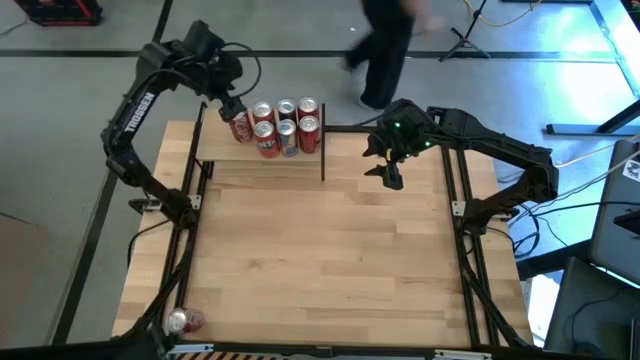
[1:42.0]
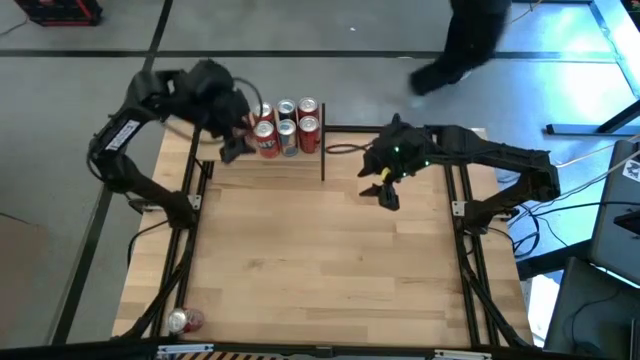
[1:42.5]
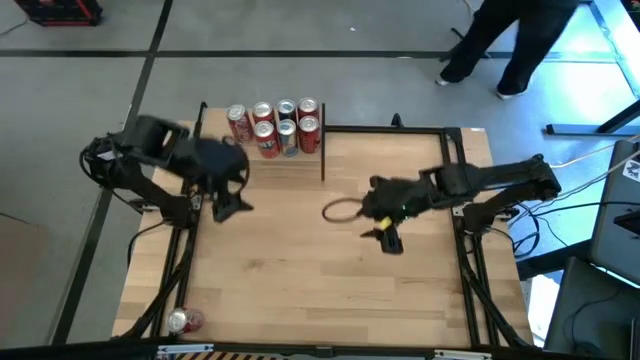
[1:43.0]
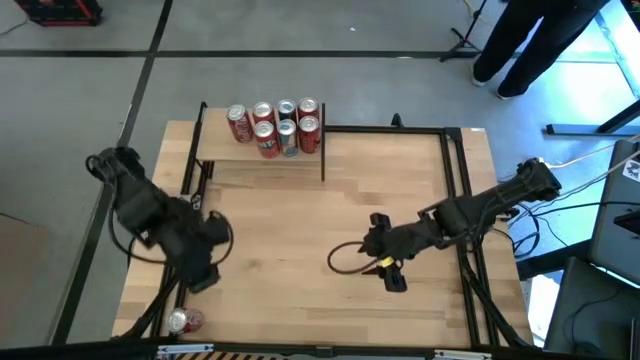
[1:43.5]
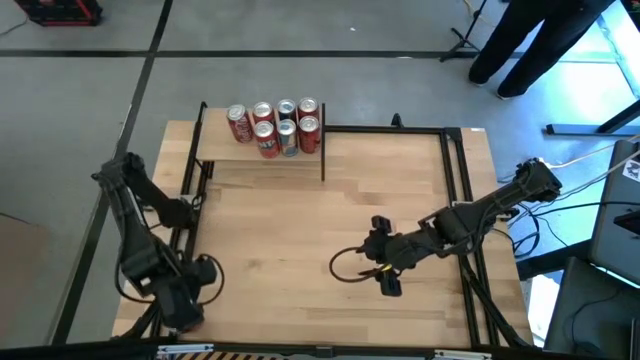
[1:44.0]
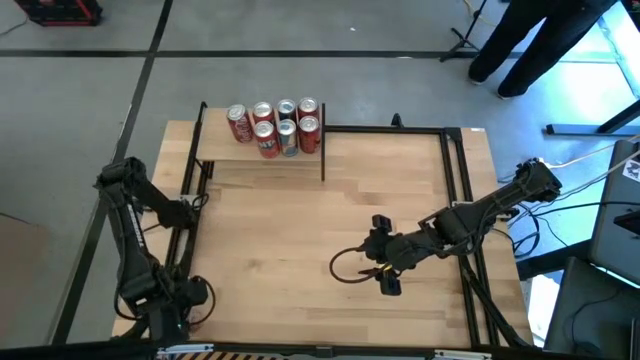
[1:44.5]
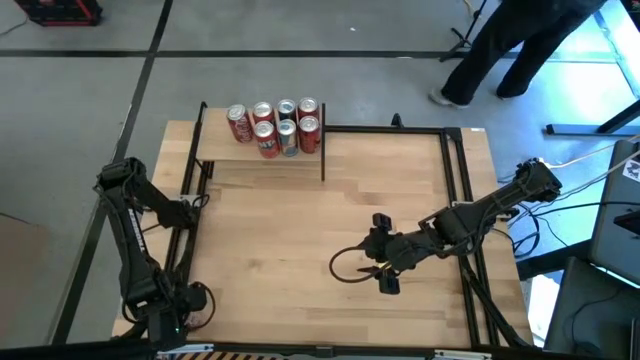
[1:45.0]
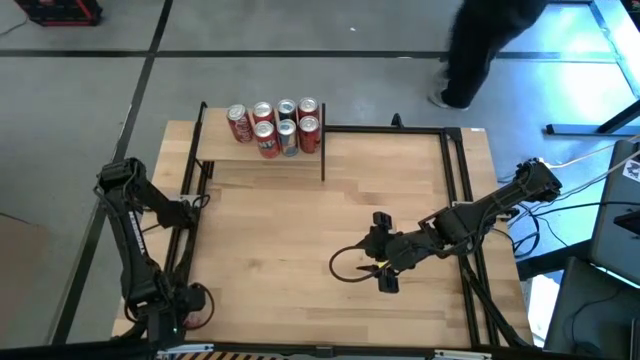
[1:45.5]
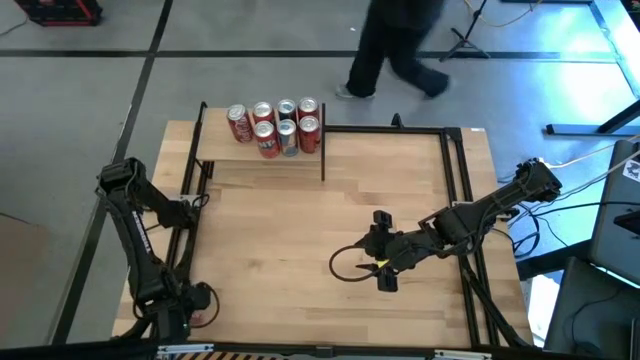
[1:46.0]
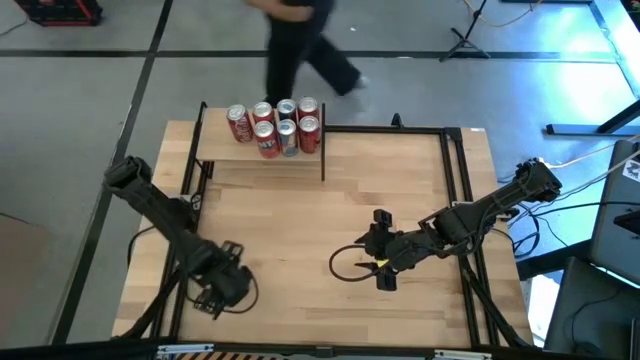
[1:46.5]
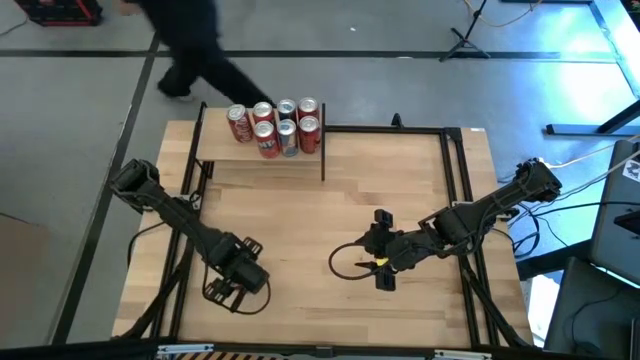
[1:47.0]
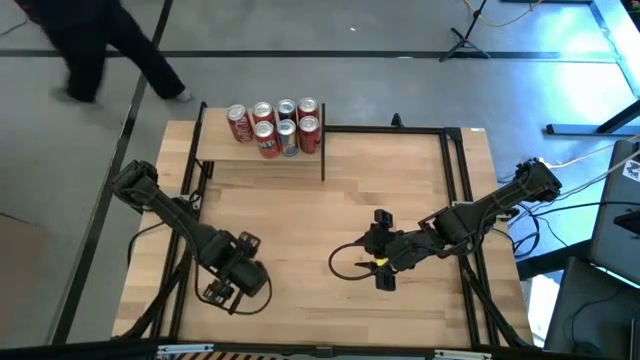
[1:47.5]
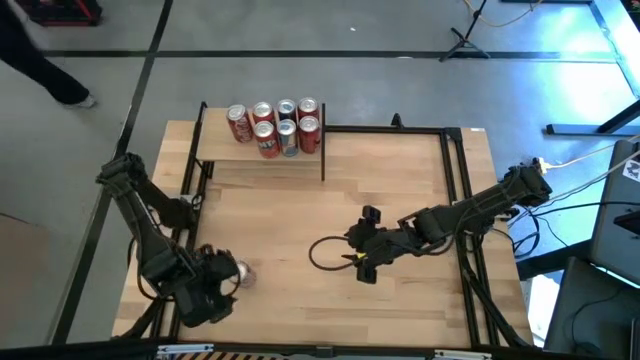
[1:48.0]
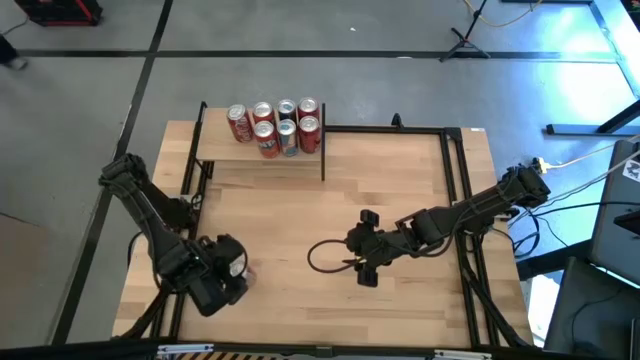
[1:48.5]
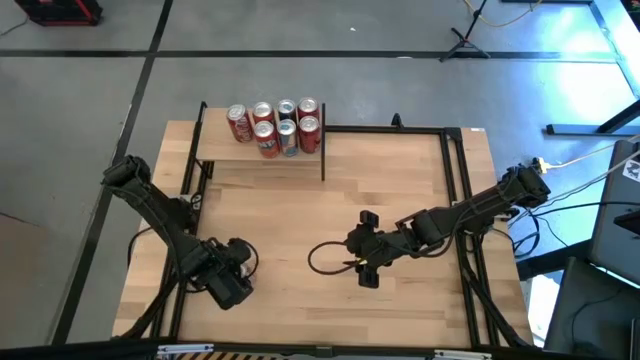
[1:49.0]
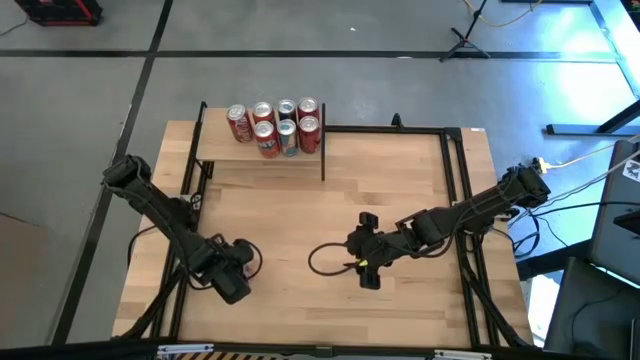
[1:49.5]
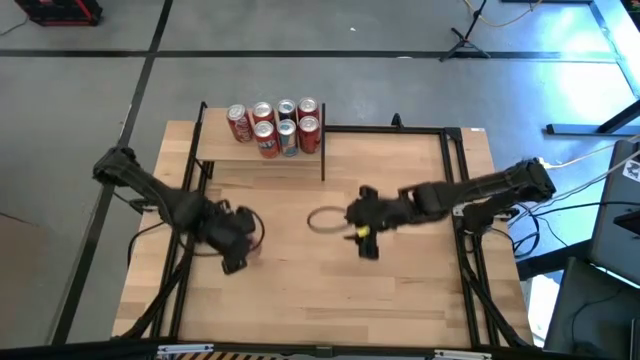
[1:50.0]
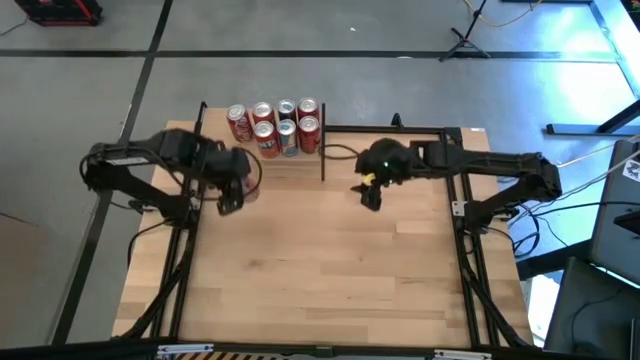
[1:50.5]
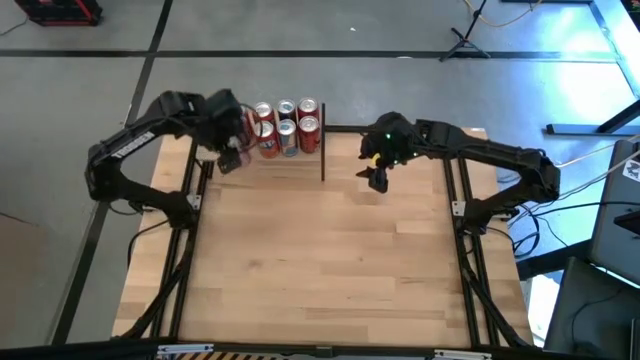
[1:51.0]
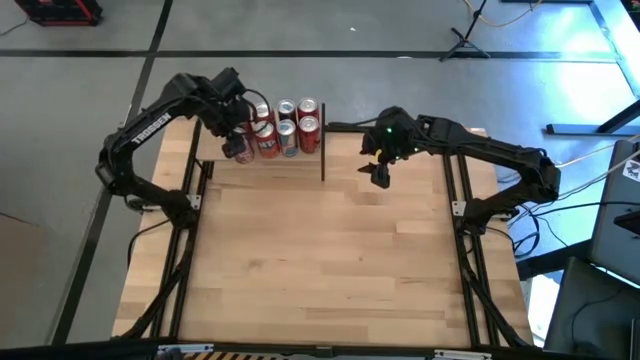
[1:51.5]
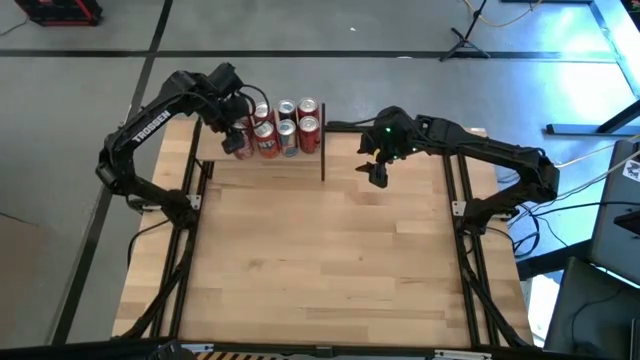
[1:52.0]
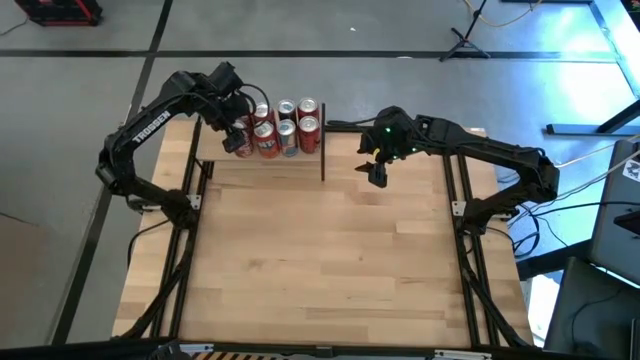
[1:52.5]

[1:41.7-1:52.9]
Task: Place canned beverage on shelf
Put the red-white soda can on the shelf aligned with the other red-white soda can

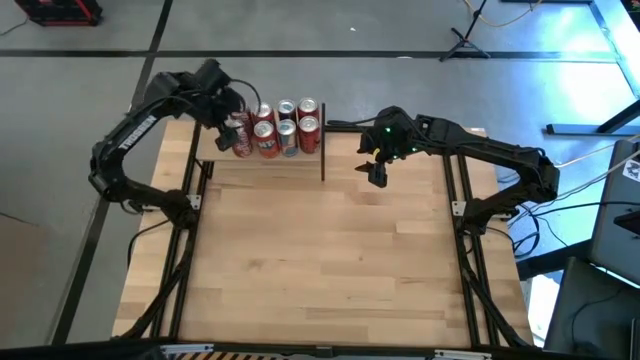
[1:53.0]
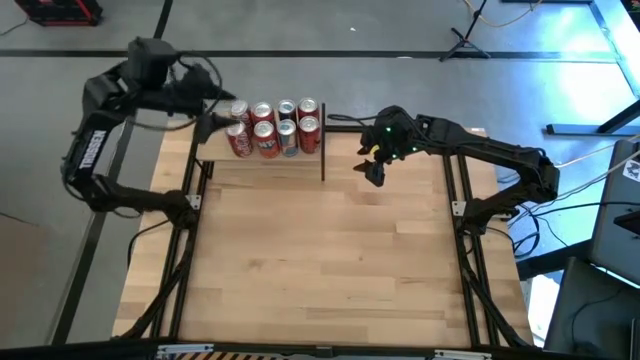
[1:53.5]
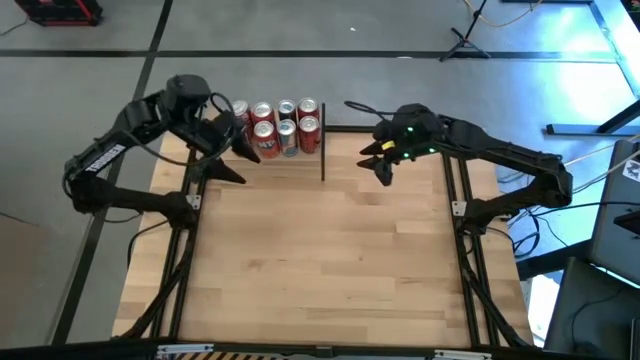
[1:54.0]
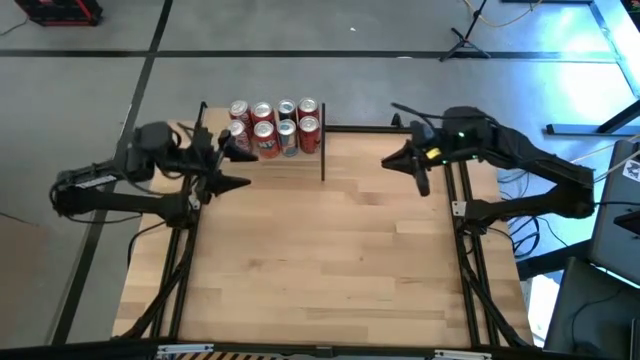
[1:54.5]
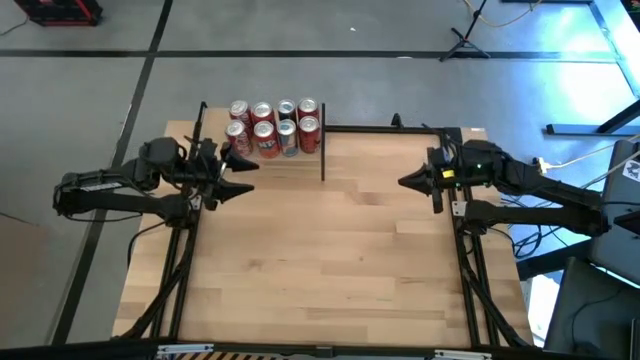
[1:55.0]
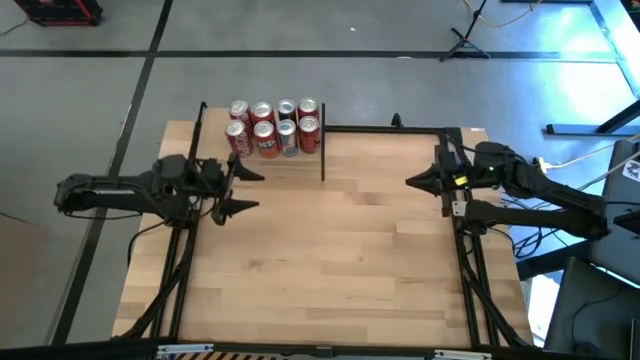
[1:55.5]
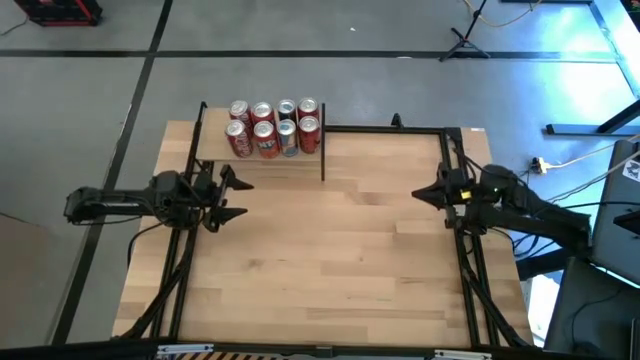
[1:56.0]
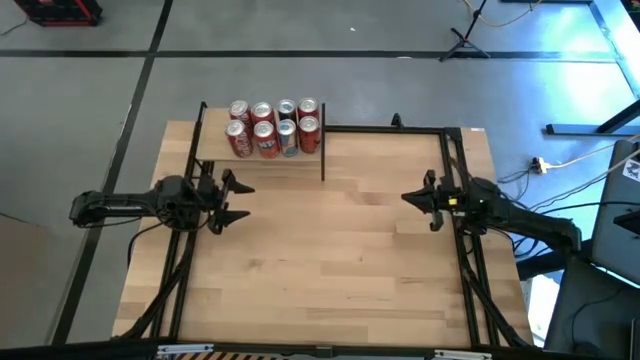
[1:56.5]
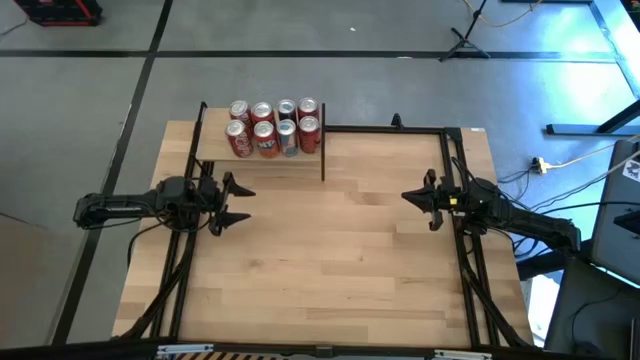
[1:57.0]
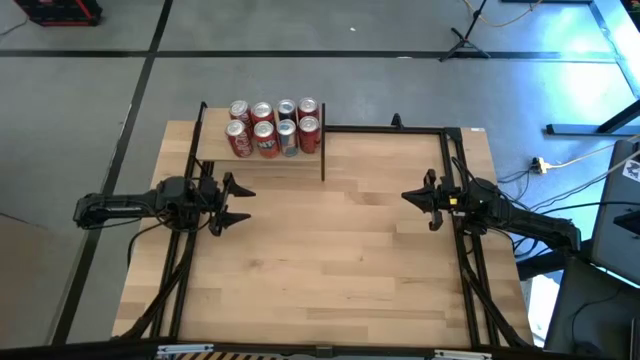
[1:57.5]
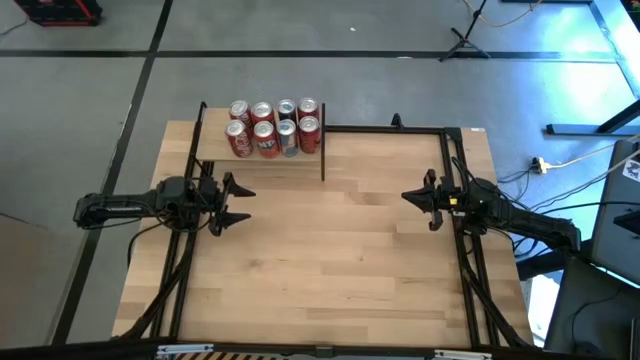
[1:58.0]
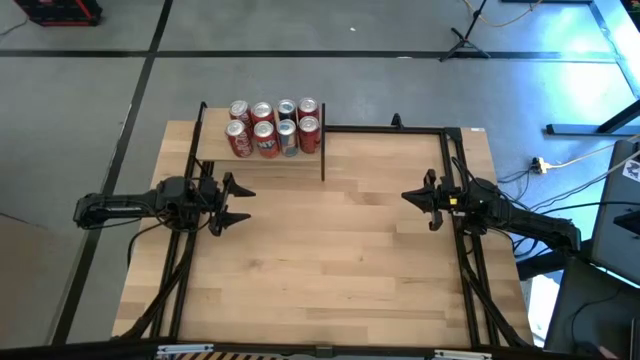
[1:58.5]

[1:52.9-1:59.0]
Return to Home Position

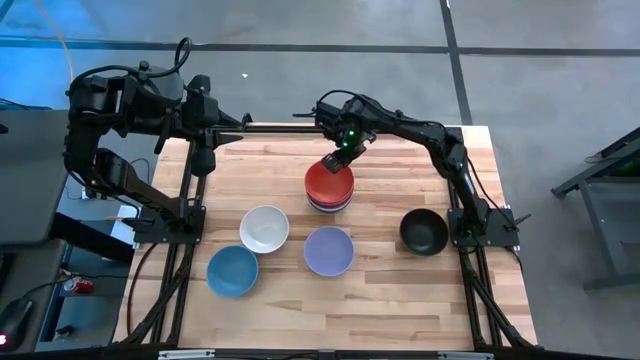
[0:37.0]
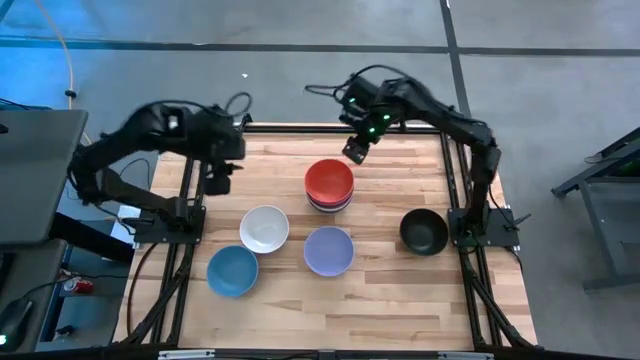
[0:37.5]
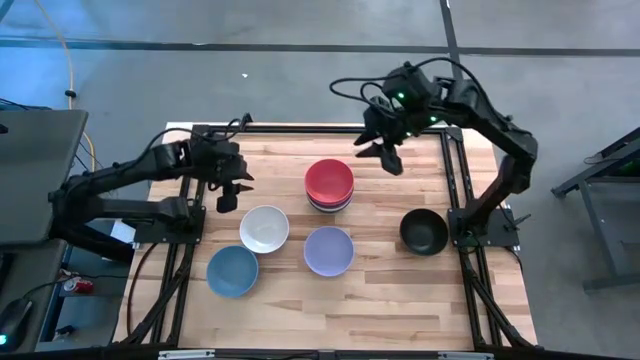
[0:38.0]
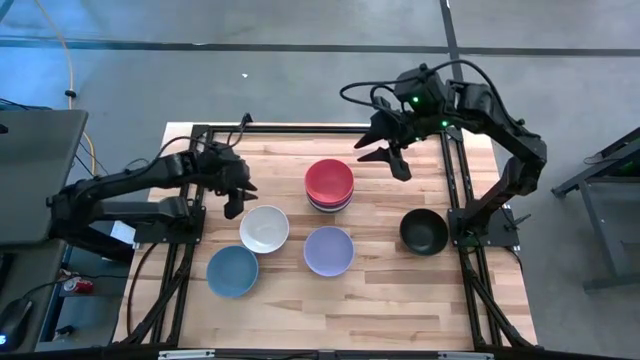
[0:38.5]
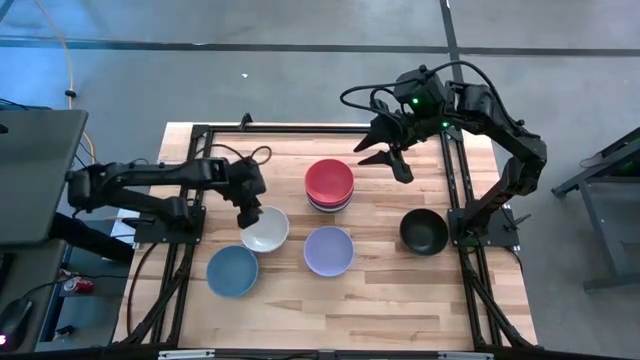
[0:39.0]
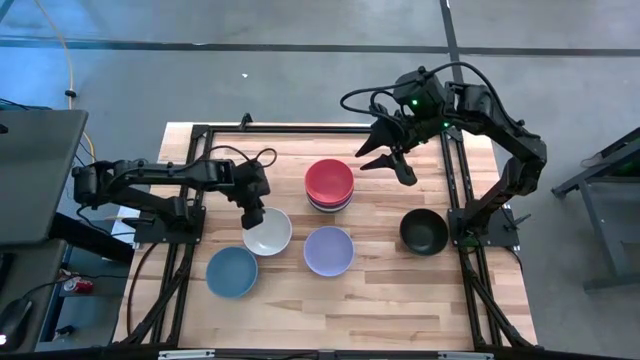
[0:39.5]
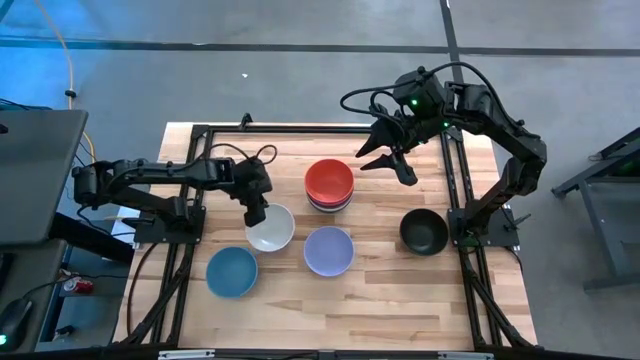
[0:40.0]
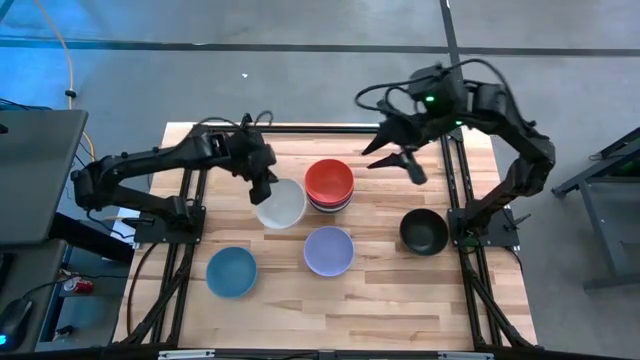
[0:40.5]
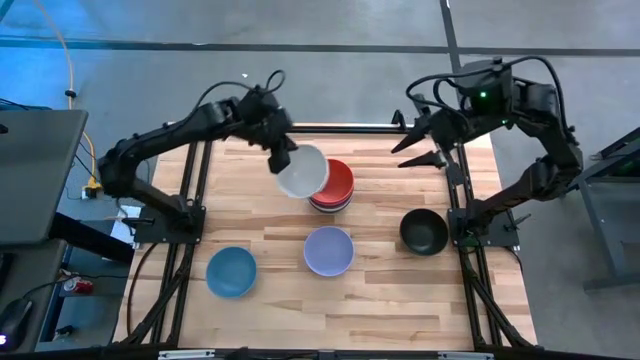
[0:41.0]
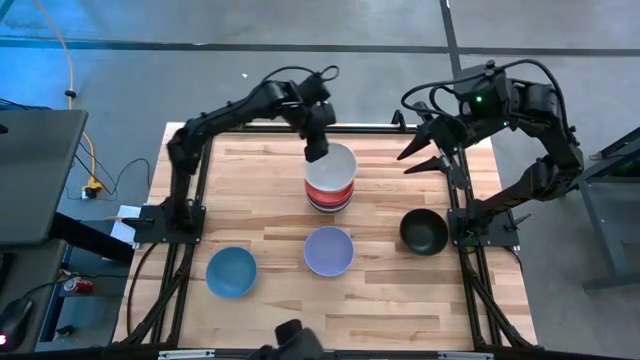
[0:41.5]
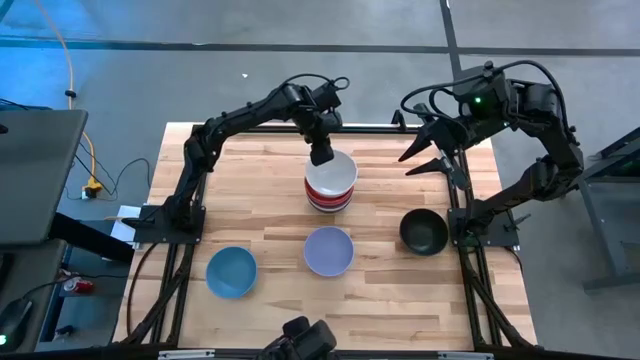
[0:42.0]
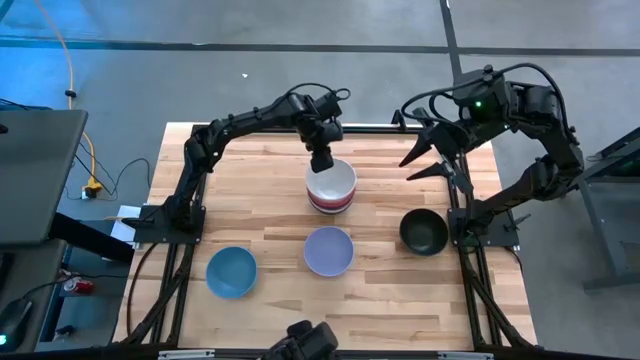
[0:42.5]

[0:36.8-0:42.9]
Task: Nest bowls inside each other
Stack the white bowl on top of the orange bowl
